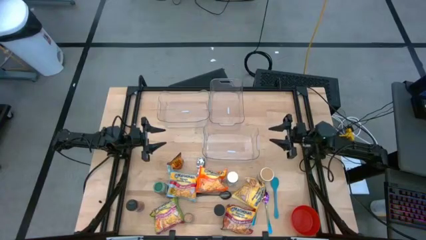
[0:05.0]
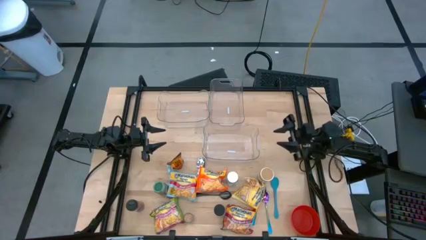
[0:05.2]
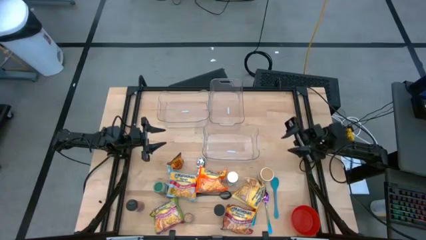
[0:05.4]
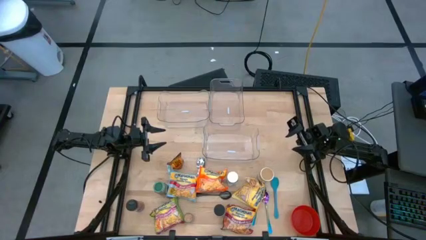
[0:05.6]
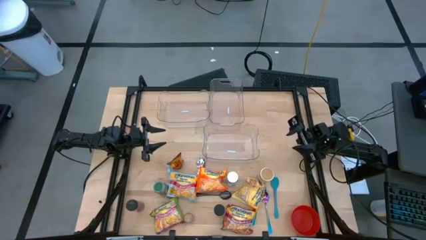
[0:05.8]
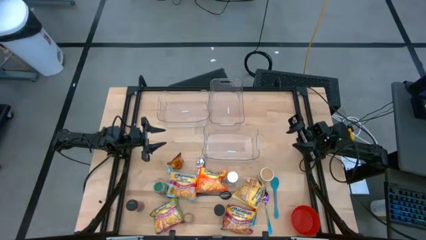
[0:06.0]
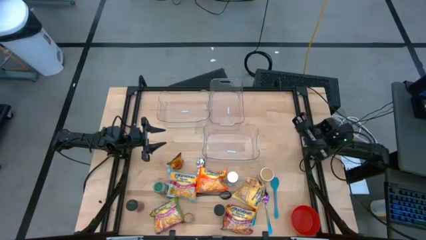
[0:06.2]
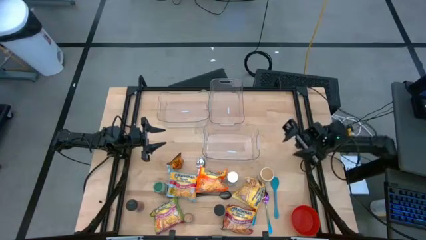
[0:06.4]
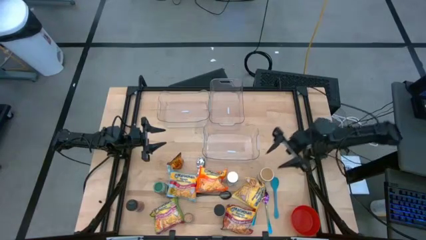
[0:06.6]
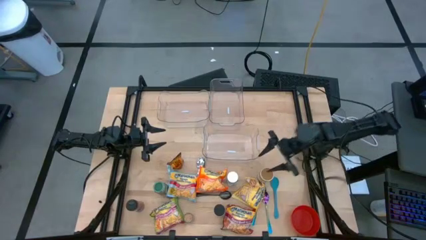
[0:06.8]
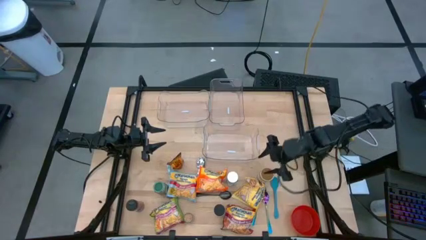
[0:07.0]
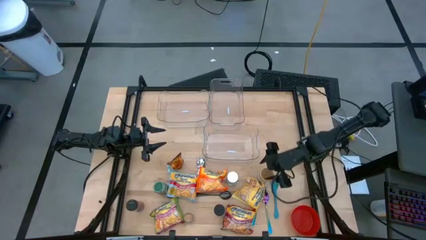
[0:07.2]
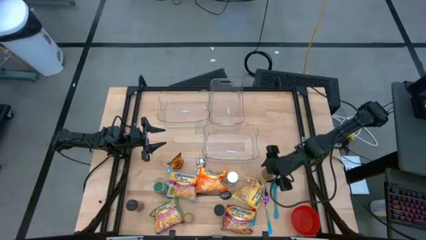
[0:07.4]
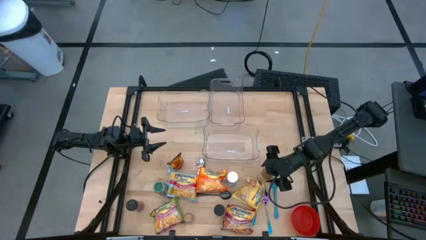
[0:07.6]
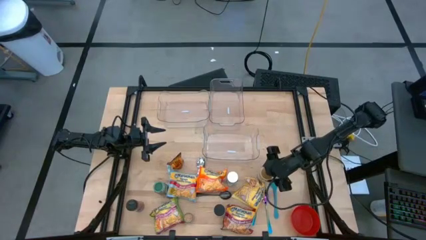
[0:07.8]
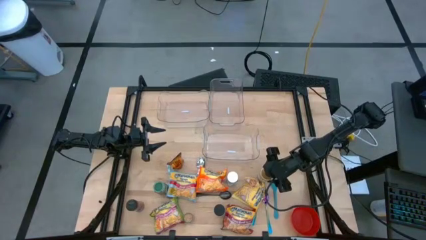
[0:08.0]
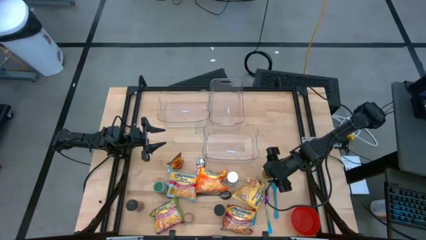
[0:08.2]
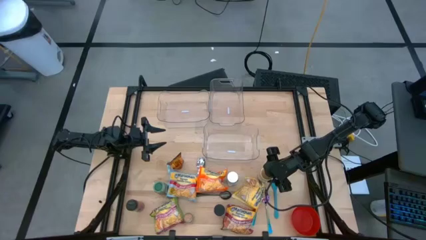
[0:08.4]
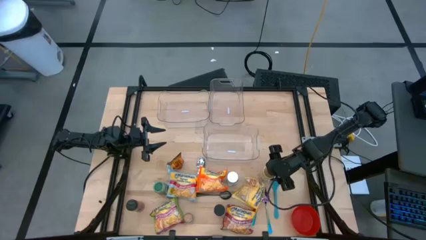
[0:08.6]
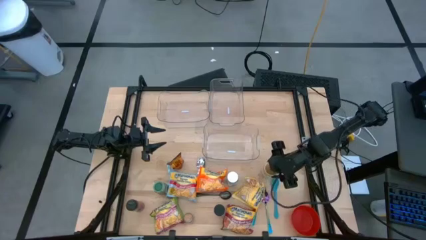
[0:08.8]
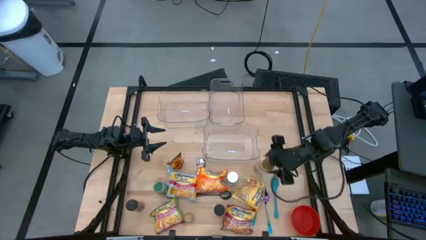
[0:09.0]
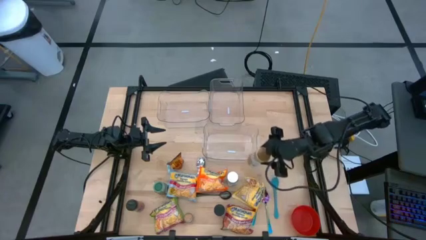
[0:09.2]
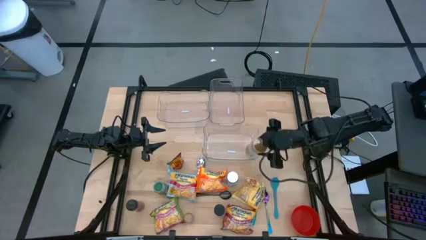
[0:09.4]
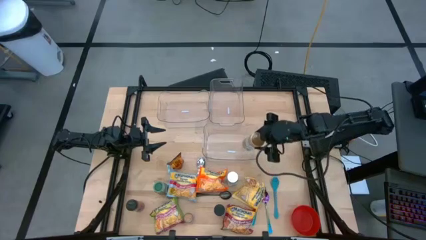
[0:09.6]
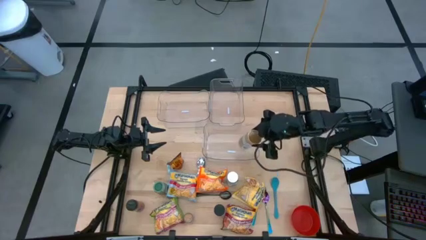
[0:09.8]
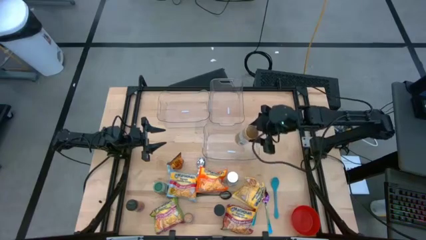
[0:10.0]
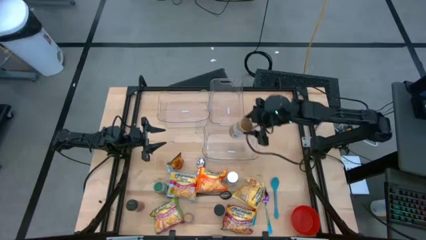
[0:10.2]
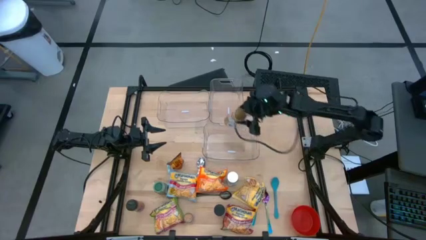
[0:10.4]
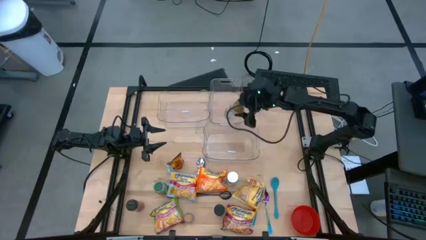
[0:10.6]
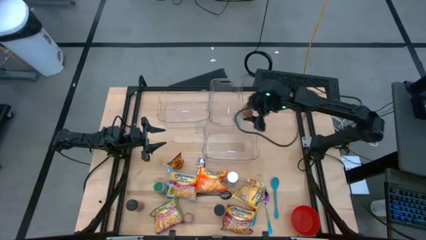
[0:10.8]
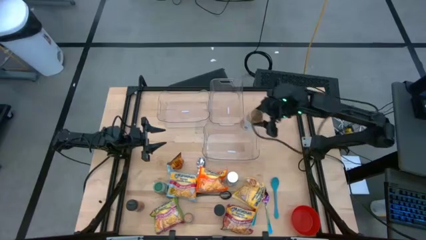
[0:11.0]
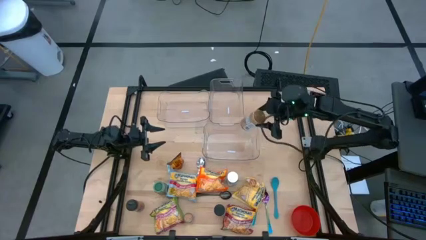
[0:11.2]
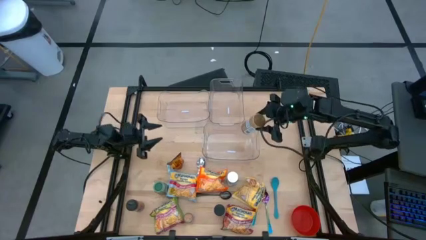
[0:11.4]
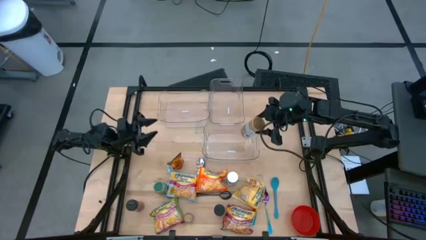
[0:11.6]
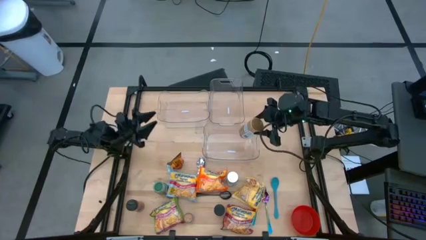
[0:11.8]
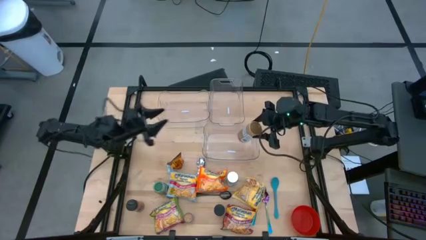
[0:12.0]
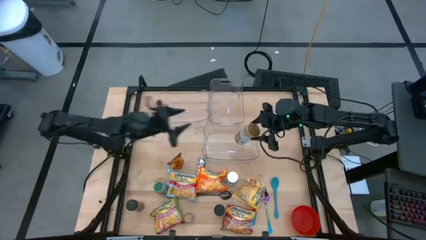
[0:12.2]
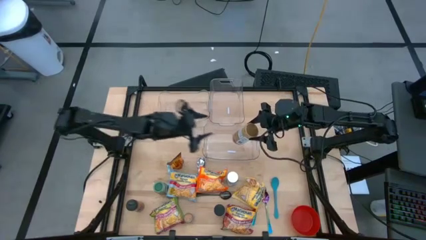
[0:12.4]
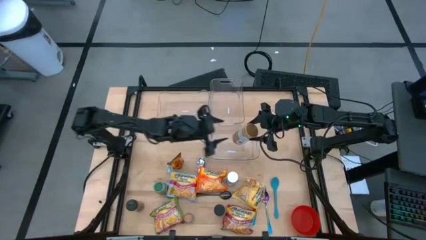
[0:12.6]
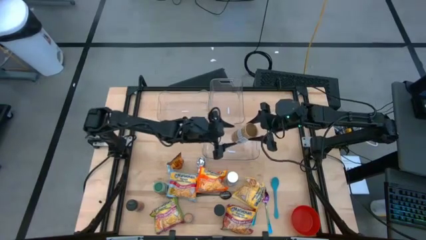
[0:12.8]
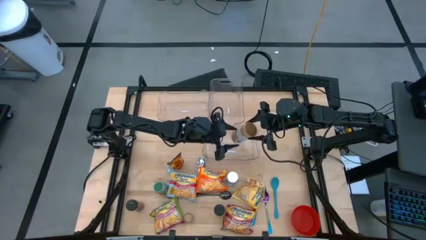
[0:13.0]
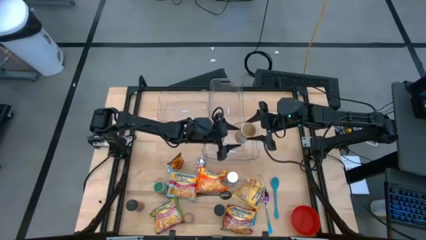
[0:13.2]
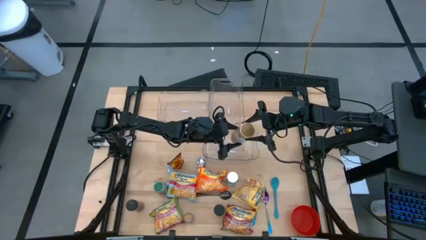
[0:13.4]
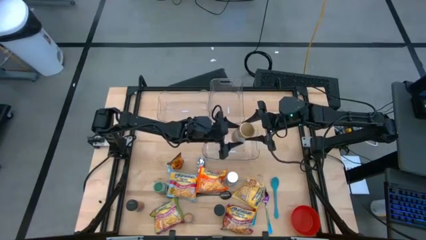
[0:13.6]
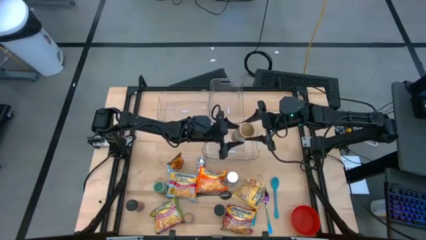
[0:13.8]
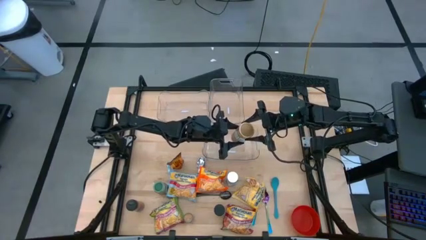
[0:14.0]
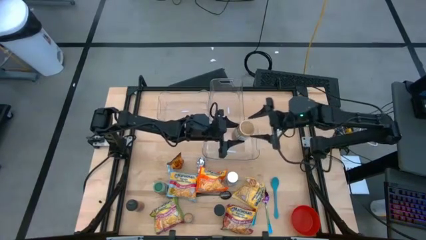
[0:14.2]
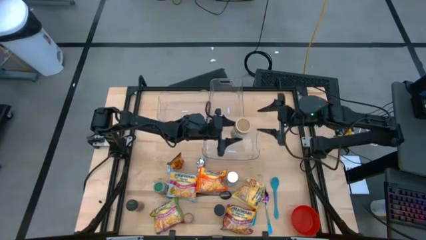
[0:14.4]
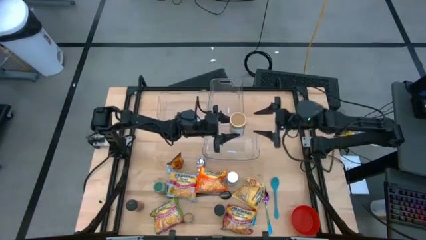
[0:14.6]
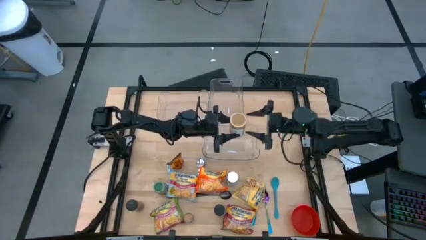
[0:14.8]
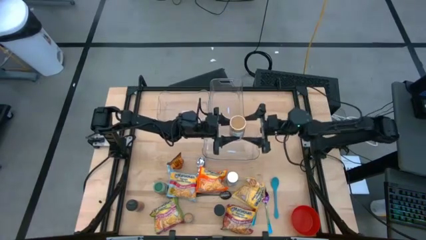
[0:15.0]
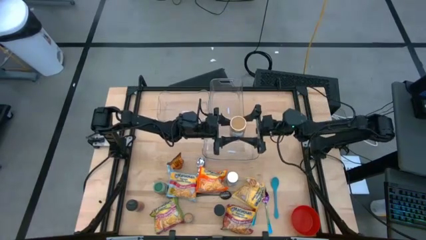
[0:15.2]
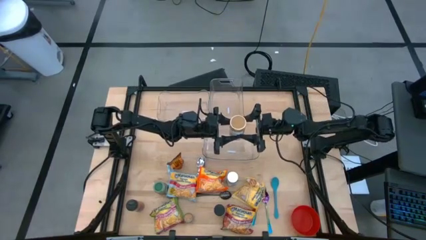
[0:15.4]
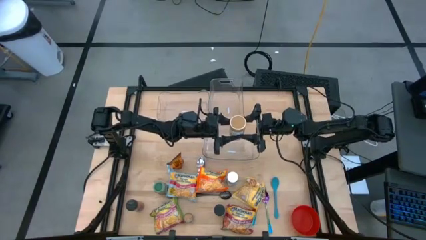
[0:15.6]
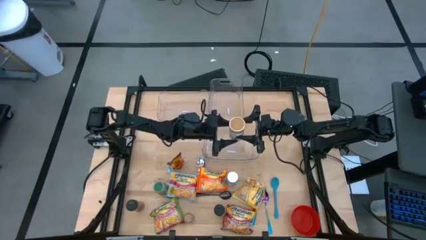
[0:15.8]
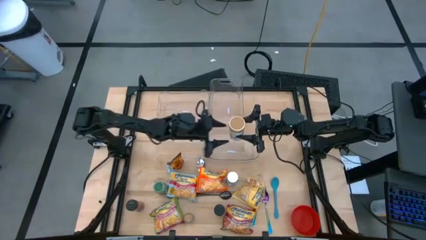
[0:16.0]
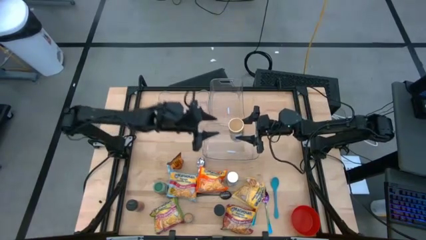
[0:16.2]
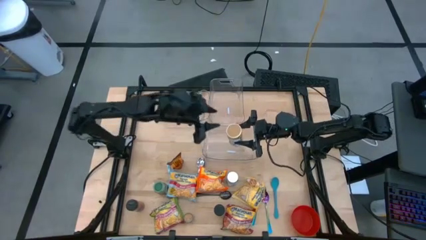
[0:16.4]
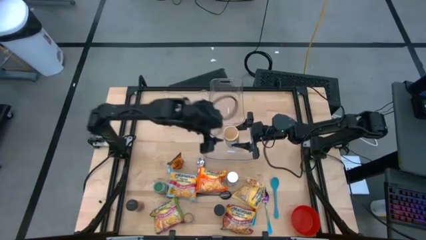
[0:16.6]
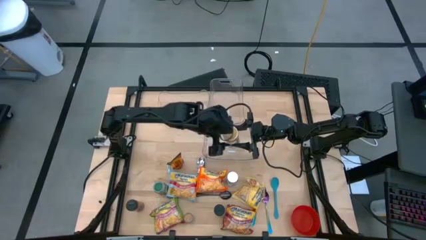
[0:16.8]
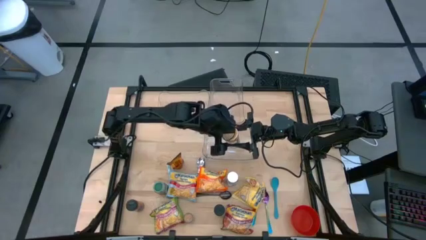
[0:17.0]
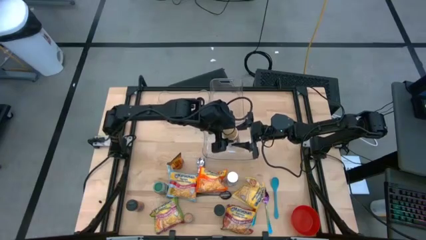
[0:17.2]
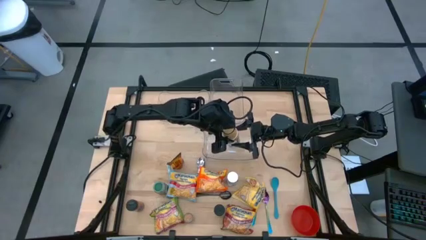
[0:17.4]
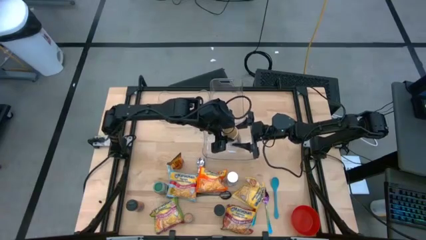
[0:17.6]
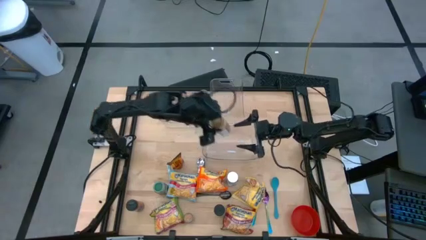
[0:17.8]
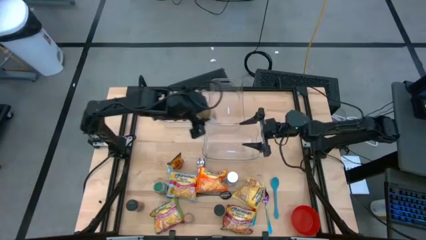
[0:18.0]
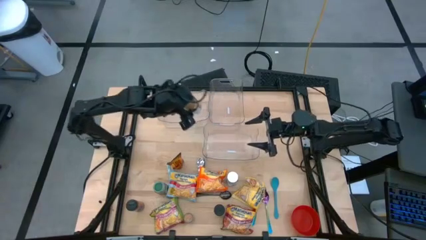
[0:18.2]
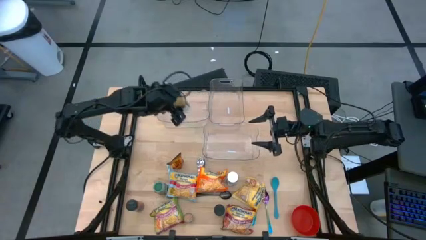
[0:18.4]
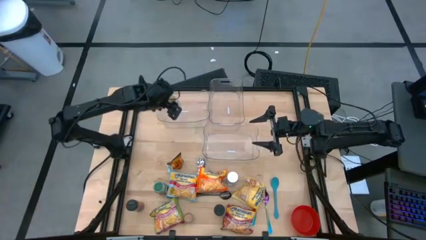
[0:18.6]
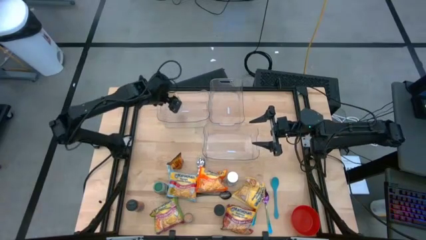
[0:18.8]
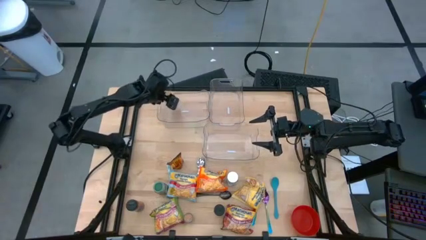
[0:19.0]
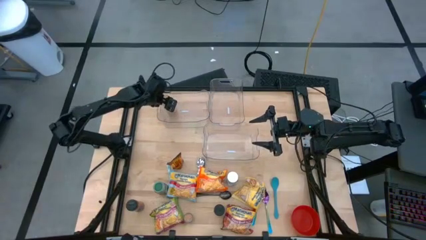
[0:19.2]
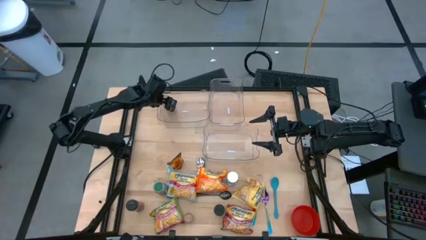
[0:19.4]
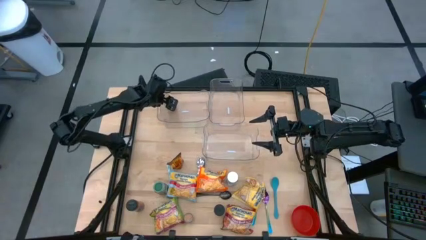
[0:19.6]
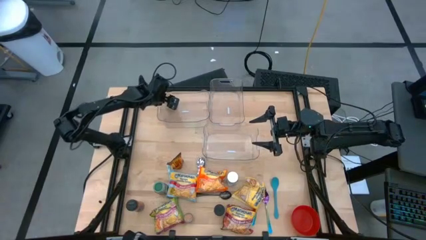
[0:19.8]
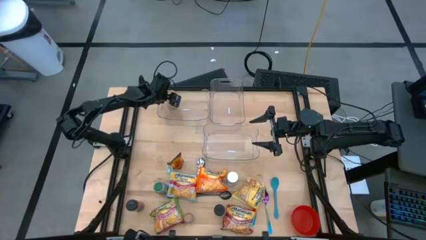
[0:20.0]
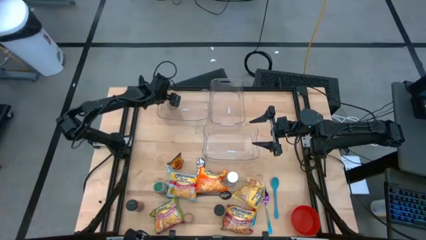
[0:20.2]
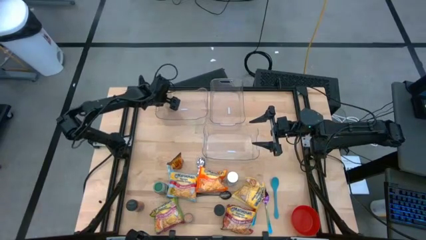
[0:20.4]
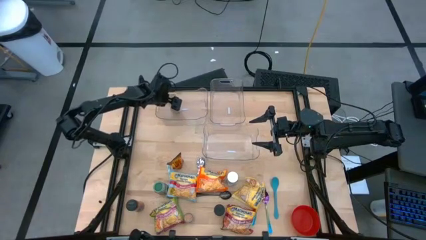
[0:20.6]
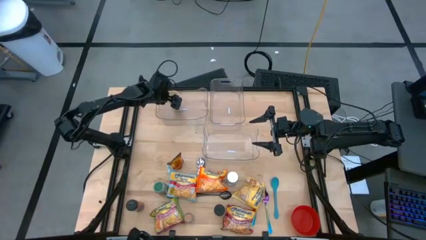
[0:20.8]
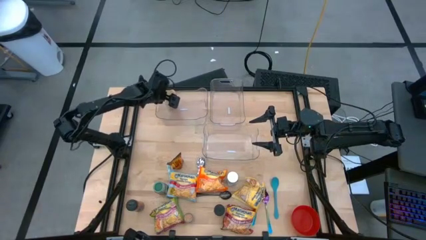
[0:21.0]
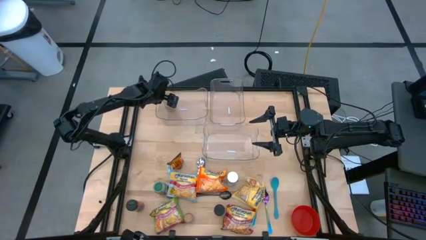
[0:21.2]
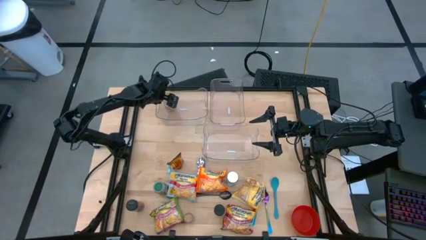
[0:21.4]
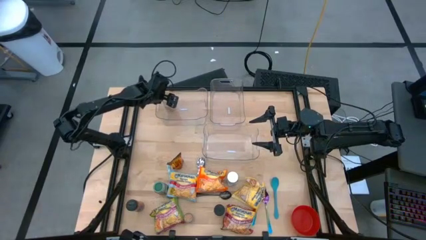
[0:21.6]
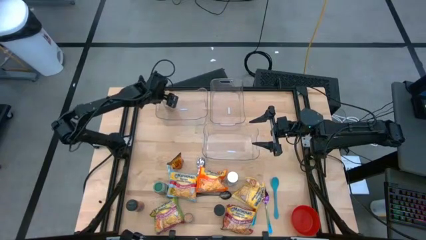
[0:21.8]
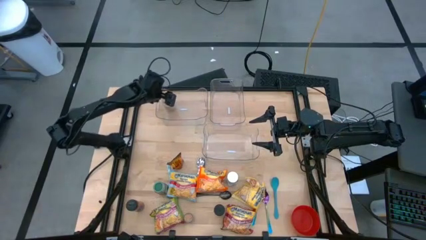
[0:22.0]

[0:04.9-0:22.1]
Task: Pick & Place Food Item
Put the gold seasoning bottle into the top left transparent container
